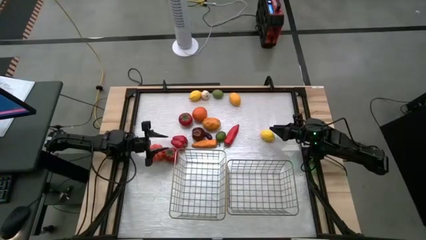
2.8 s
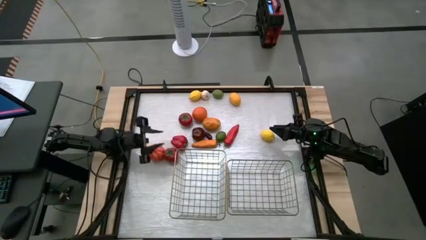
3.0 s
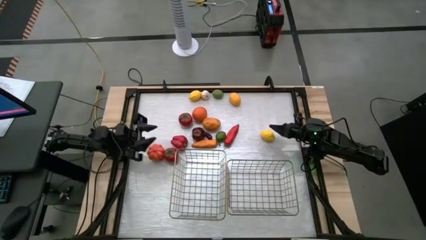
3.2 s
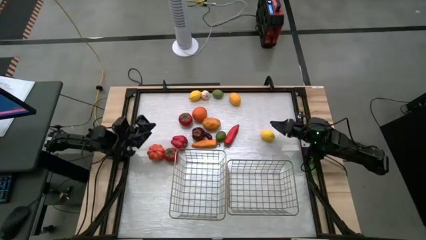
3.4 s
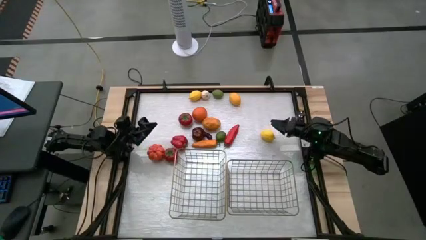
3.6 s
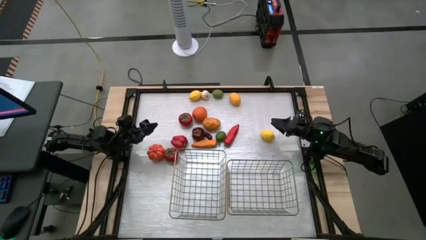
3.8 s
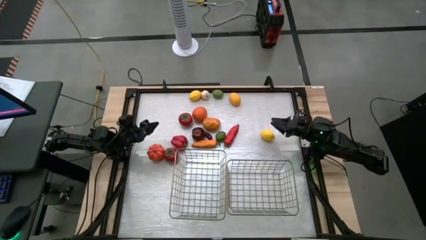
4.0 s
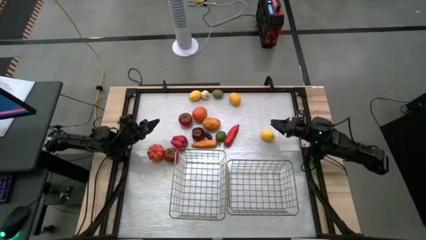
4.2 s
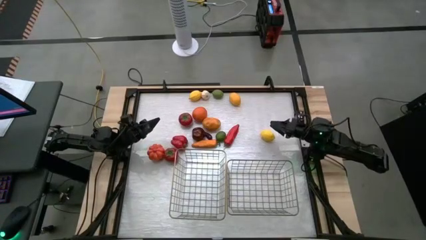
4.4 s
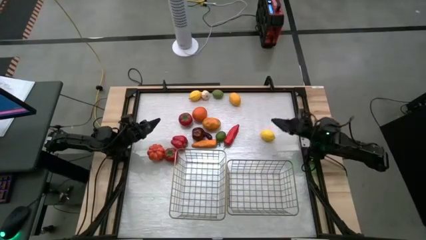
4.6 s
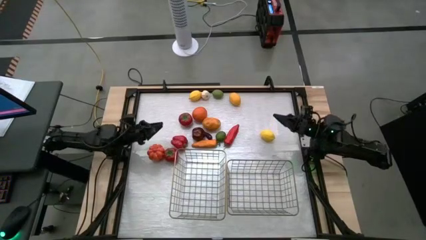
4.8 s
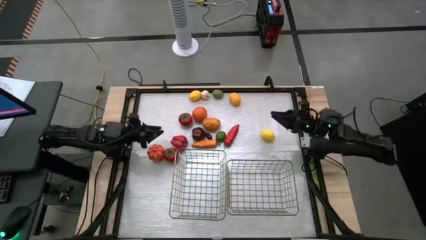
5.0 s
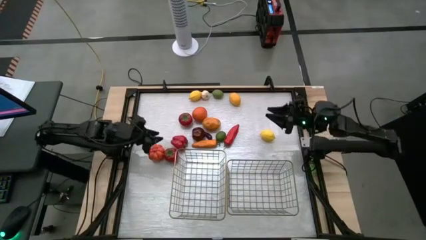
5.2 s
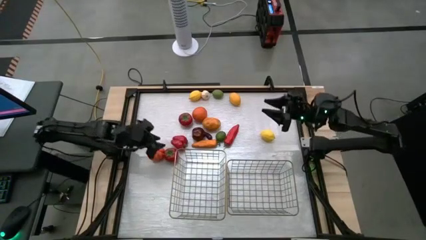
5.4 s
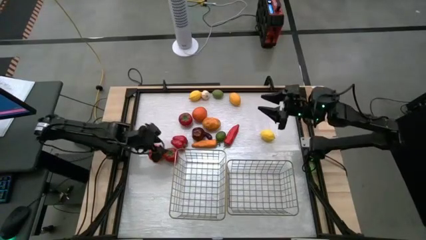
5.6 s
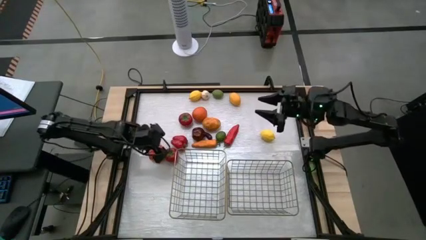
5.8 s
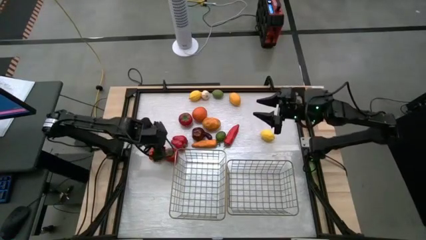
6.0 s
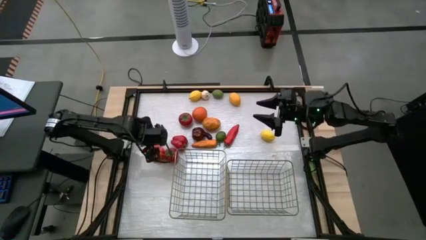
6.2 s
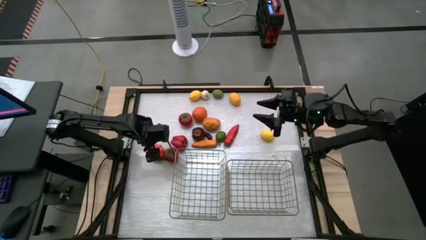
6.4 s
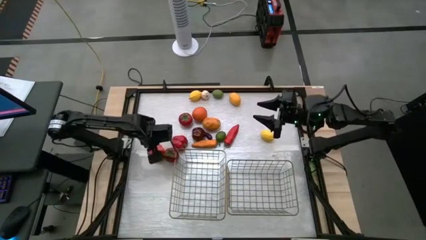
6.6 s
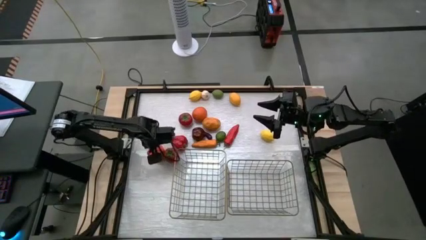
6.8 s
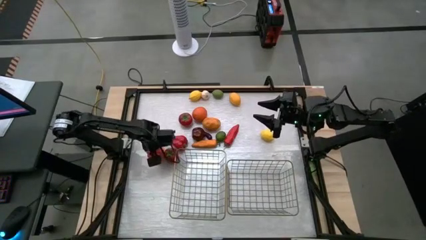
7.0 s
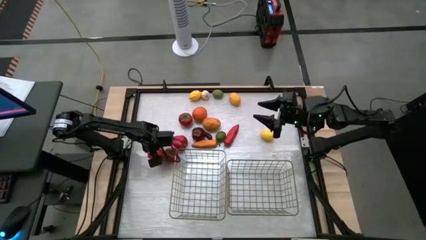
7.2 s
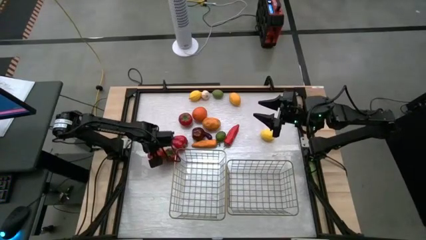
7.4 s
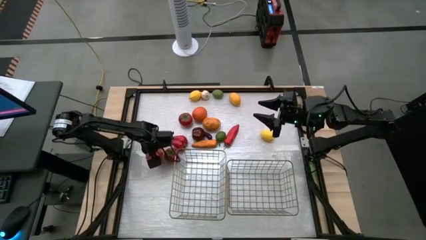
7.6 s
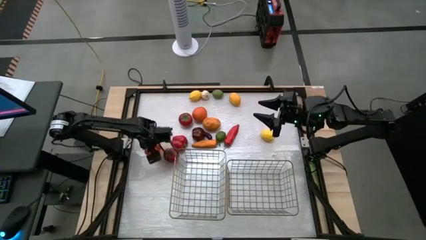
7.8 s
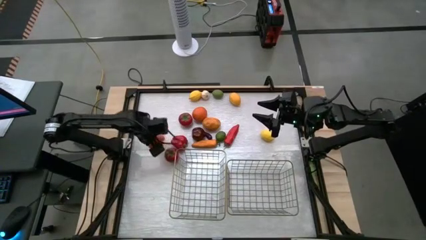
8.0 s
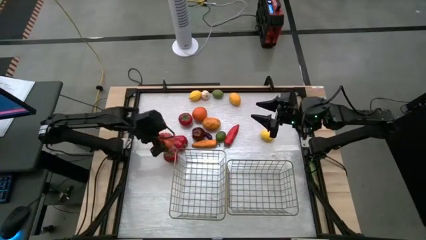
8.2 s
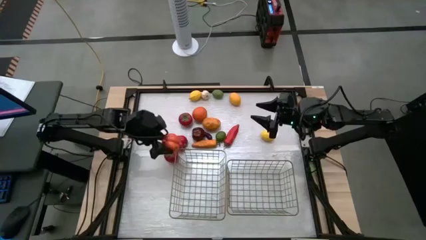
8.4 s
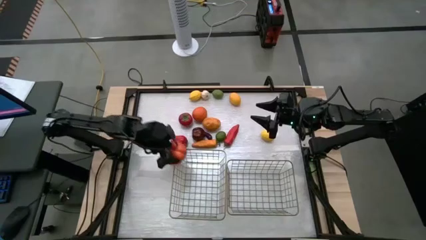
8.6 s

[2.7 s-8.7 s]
Task: Sort produce into baskets
Put the pumpkin into the left wire basket

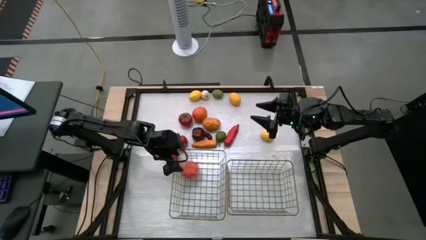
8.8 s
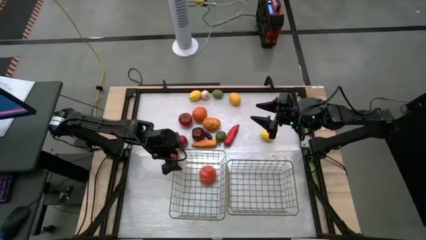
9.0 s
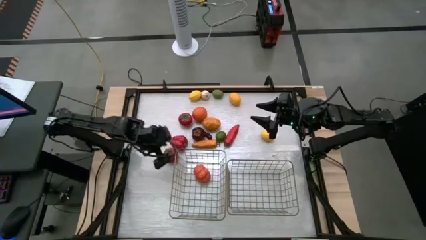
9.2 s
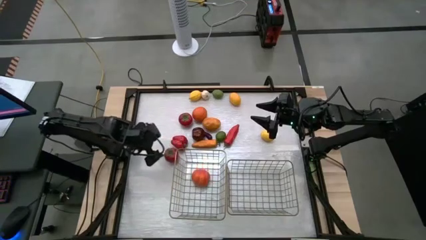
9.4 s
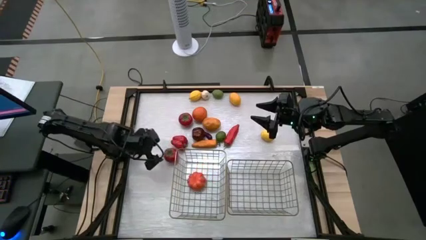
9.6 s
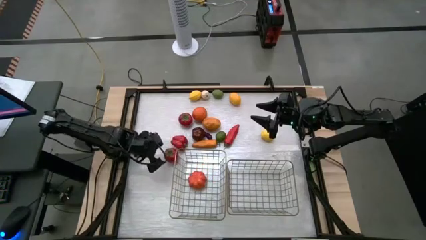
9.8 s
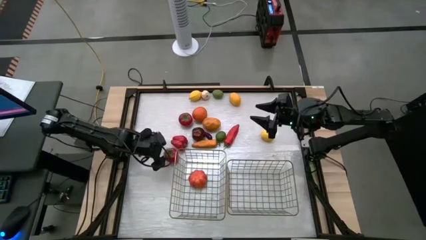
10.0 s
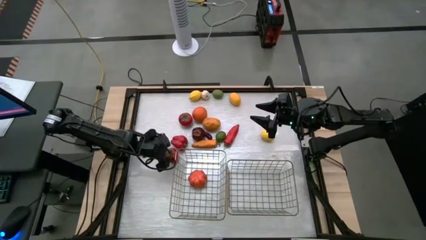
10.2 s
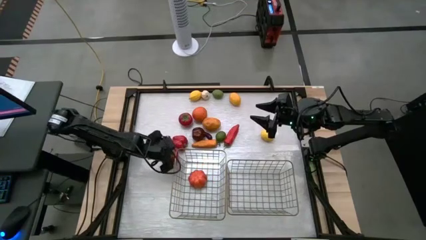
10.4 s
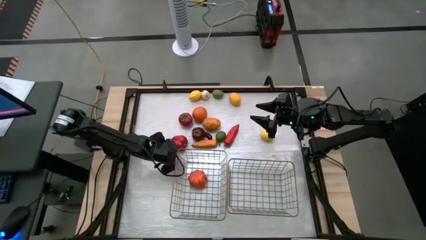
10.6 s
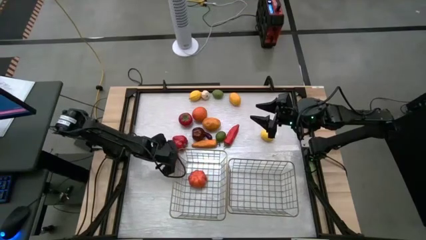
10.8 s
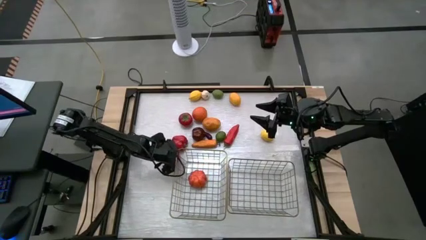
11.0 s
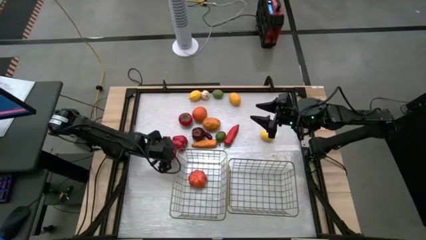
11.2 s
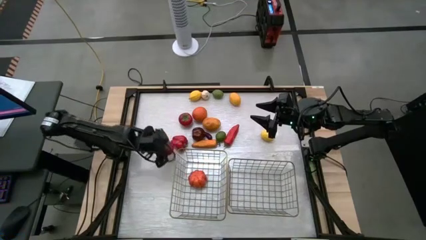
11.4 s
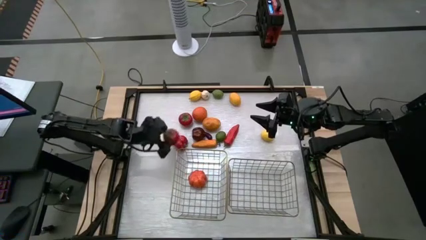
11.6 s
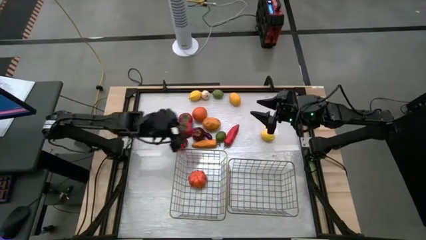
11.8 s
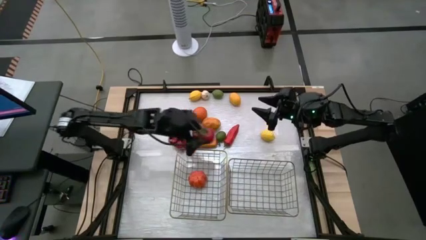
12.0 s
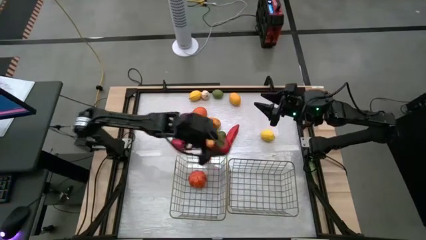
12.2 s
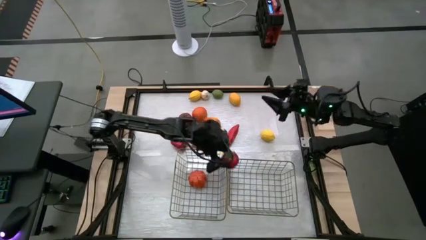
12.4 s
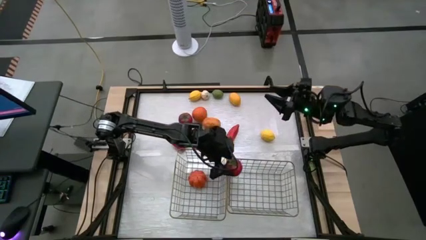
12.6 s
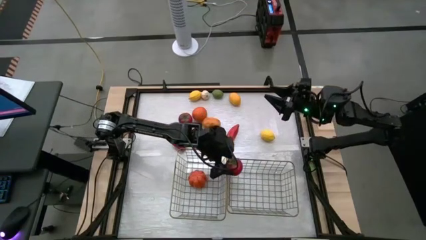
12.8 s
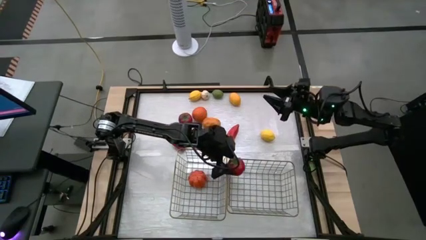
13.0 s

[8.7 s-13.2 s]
Put the bottom tomato into the right wire basket

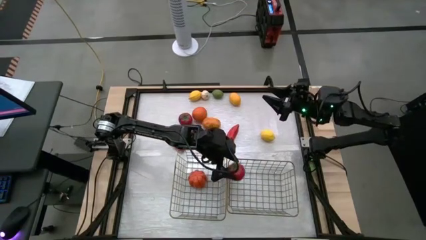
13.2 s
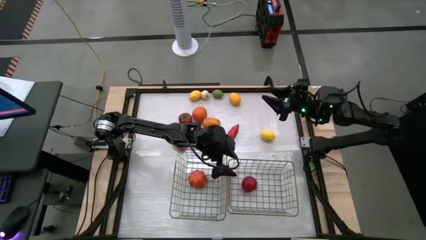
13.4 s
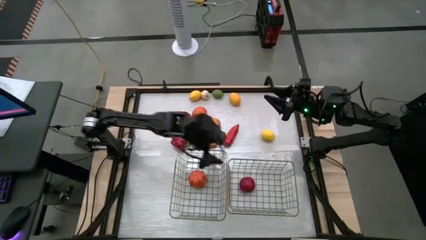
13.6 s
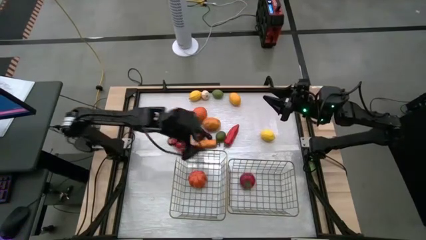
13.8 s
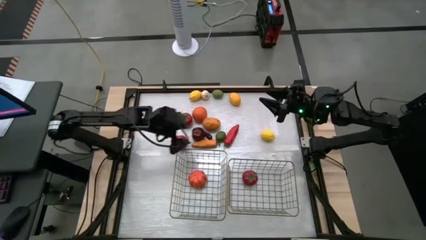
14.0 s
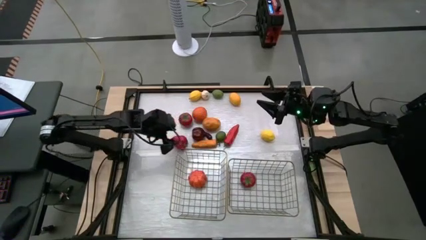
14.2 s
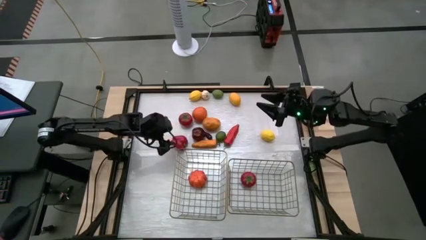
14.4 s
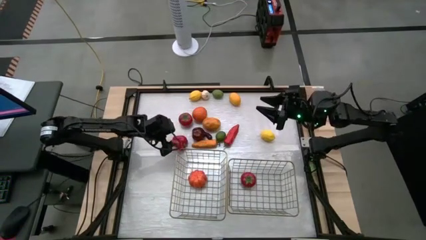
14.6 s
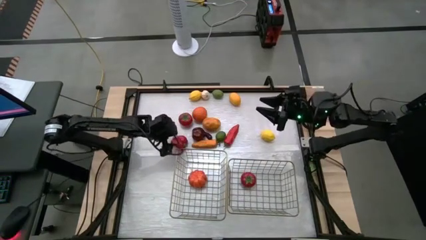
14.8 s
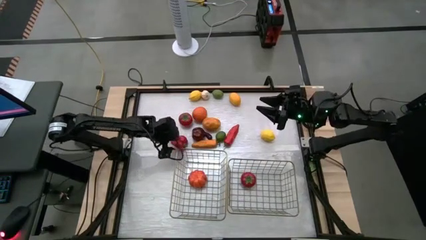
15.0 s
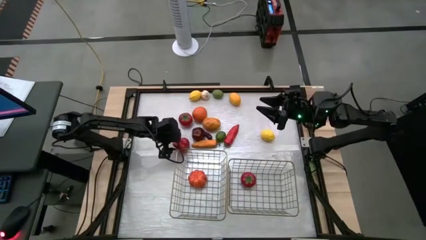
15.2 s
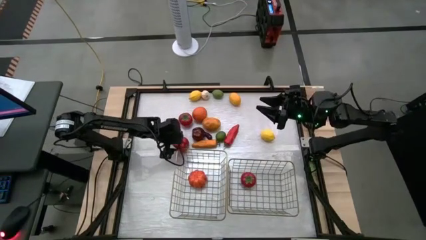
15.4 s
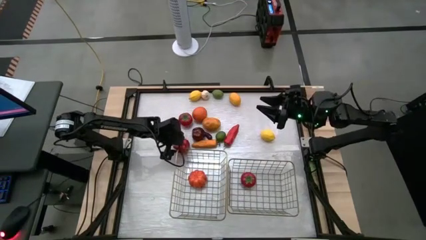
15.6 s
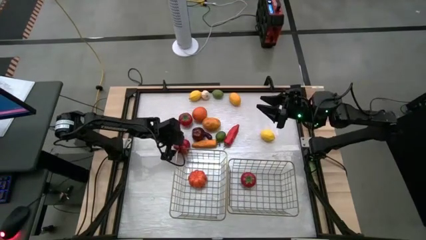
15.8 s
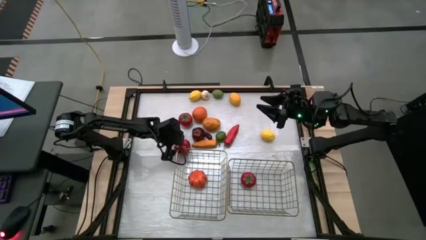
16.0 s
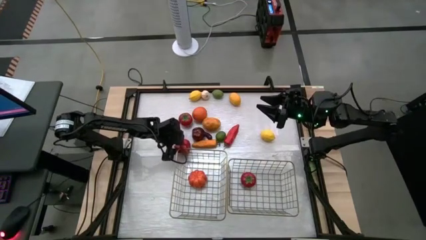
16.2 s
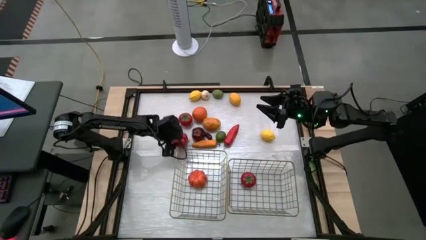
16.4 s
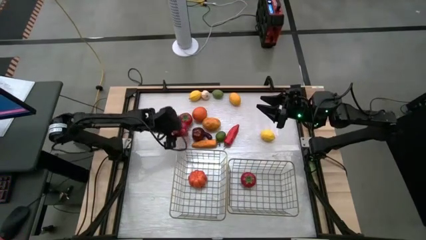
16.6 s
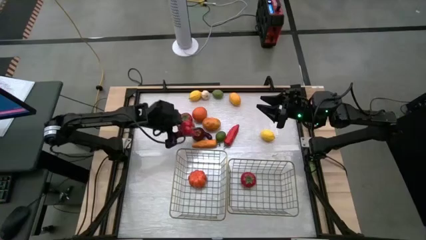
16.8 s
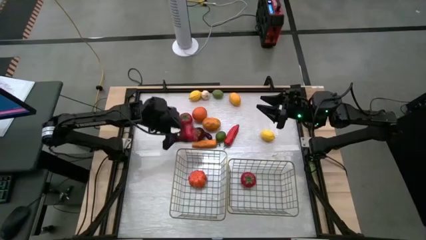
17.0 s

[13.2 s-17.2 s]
Put the bell pepper into the left wire basket

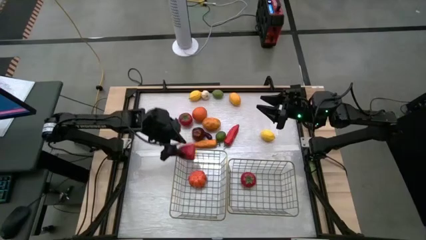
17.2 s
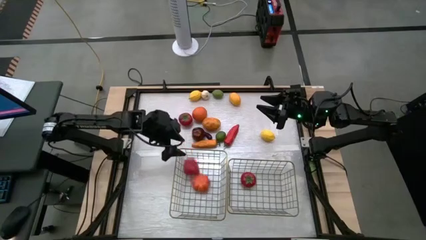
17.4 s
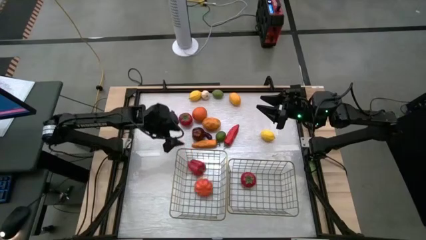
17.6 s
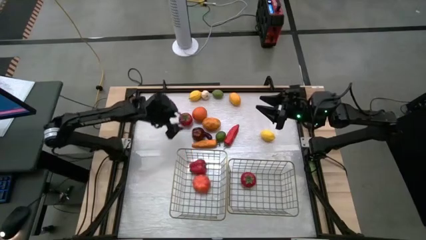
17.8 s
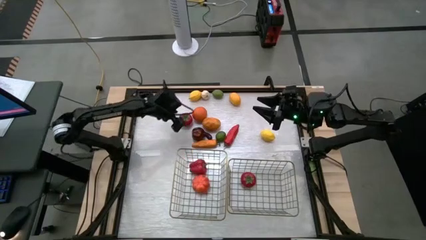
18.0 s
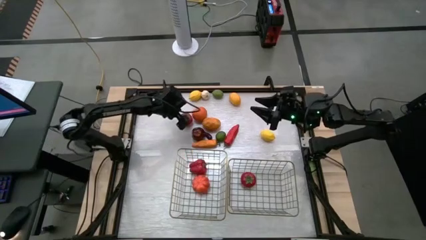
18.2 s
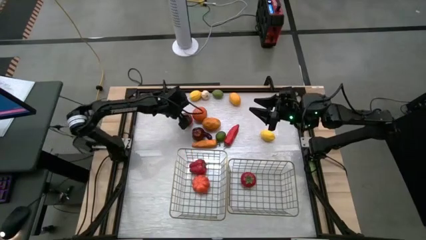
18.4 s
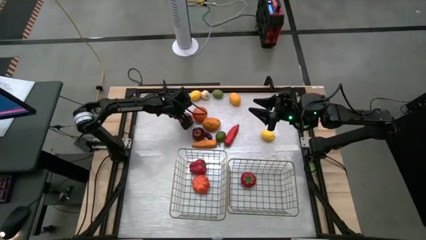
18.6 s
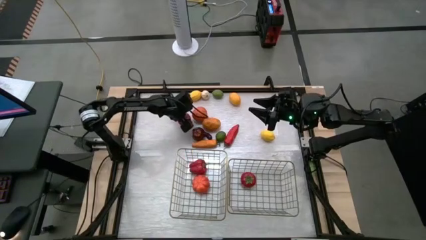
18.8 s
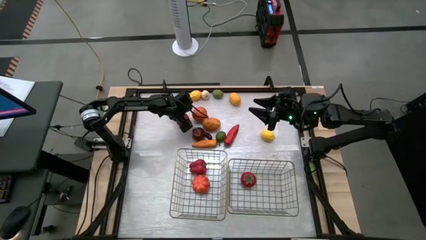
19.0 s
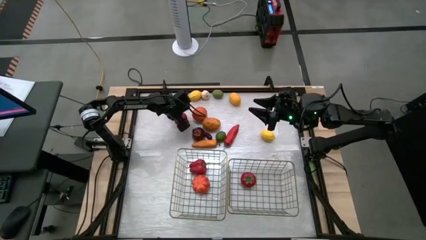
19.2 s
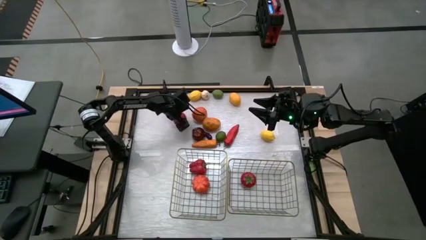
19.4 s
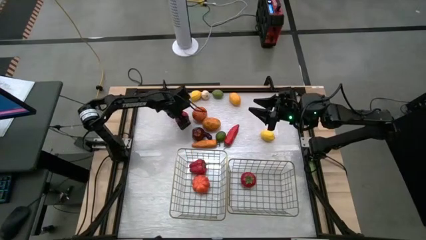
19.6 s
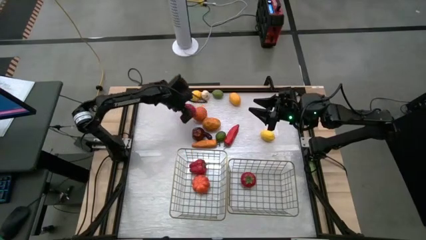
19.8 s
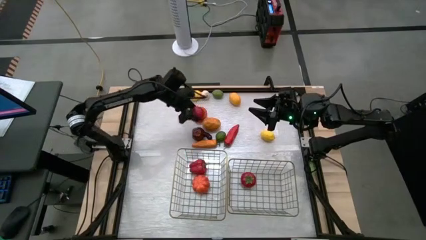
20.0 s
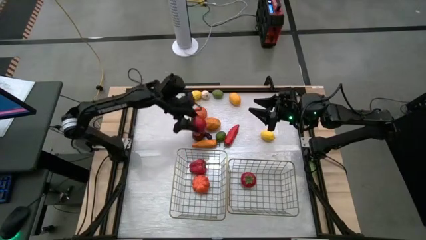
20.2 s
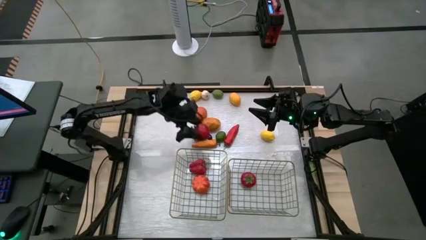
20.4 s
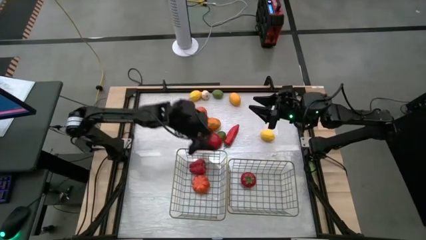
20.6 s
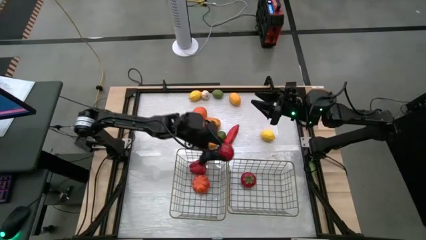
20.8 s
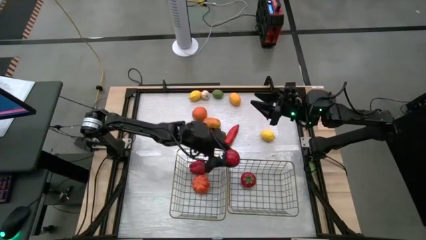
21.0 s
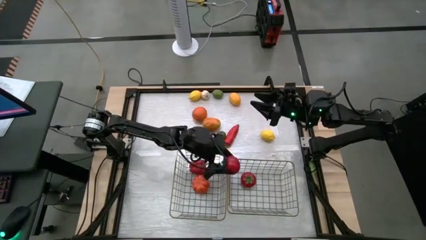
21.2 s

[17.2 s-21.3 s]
Put the tomato into the right wire basket
